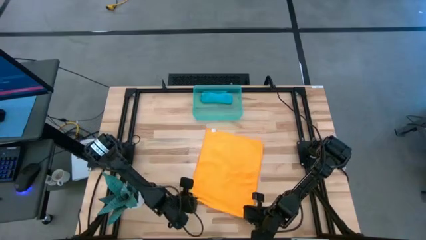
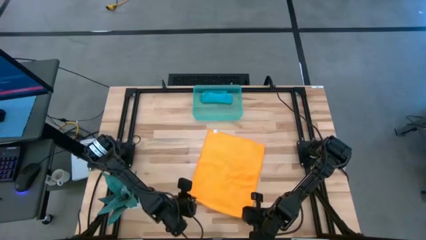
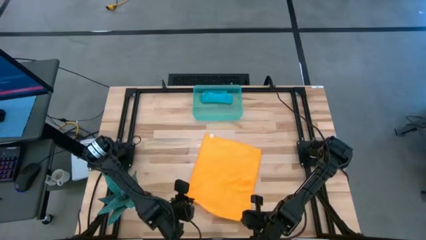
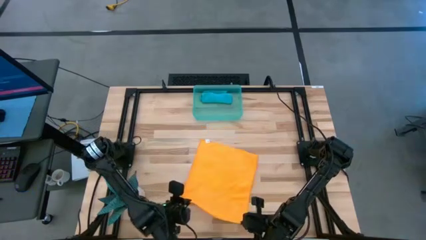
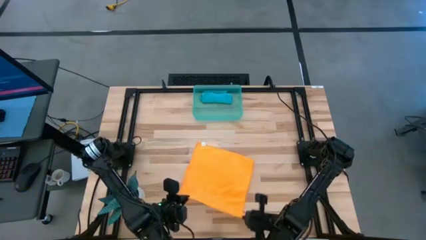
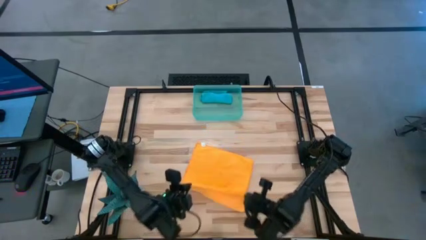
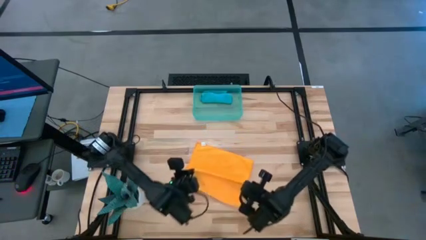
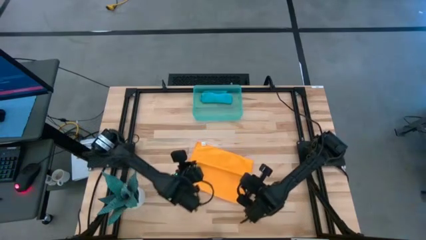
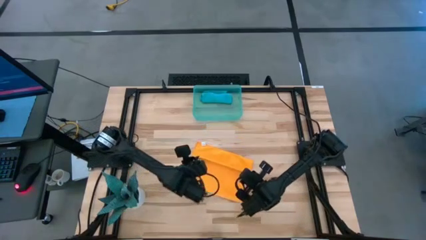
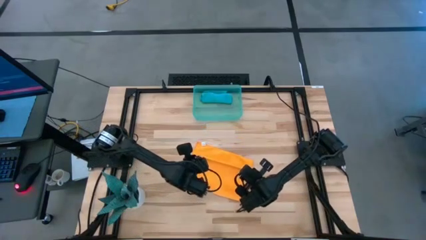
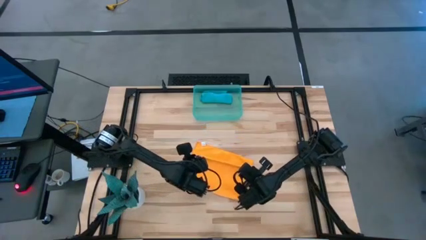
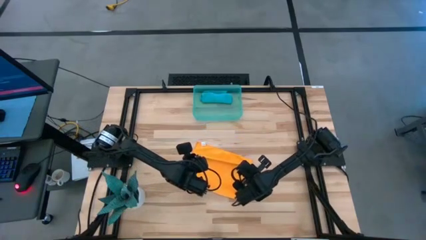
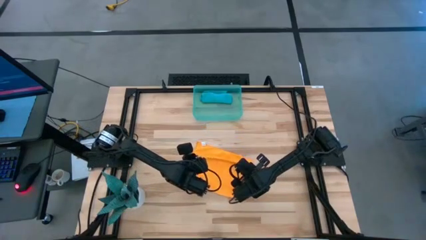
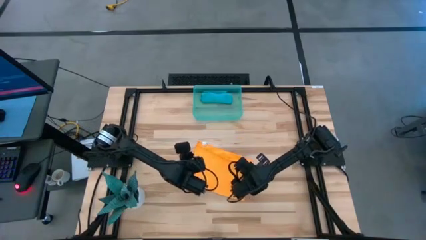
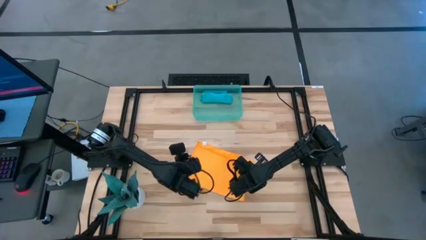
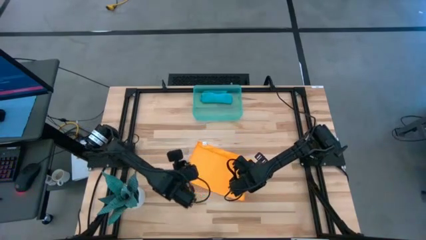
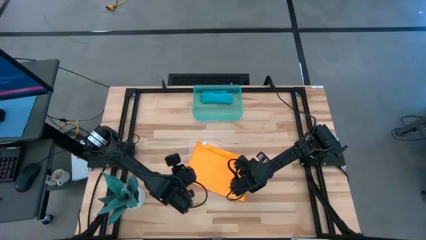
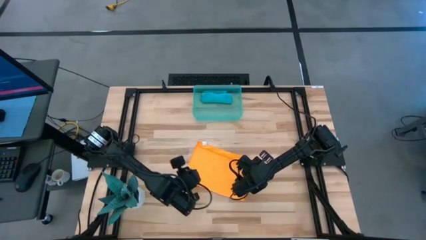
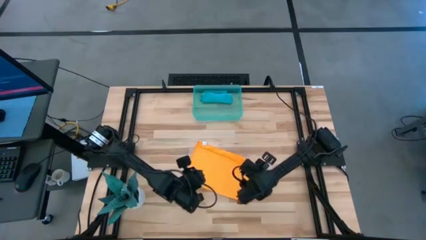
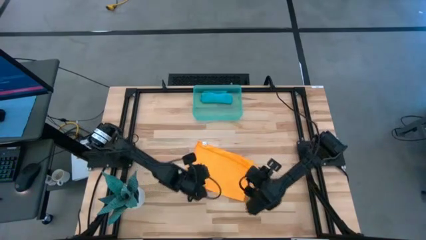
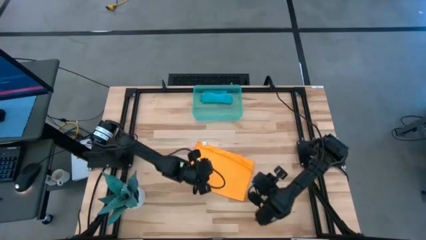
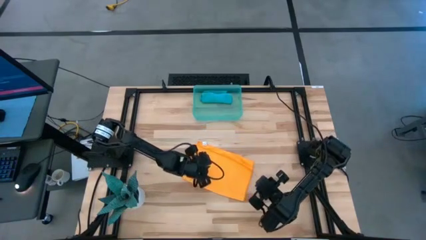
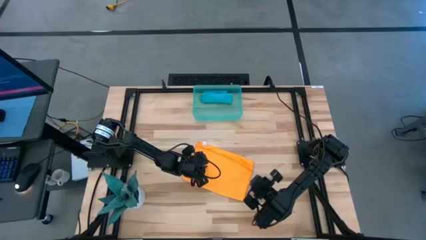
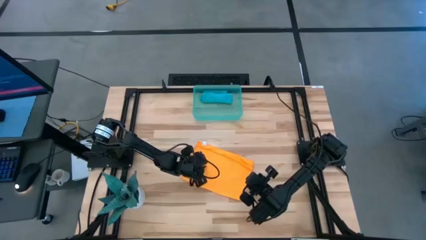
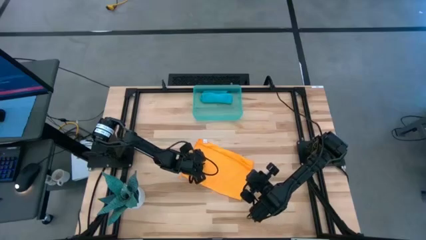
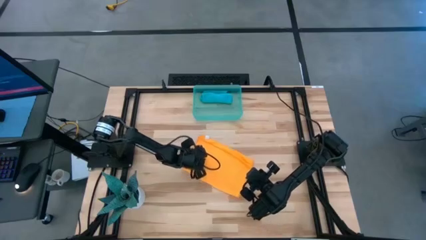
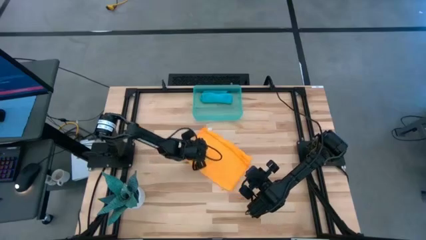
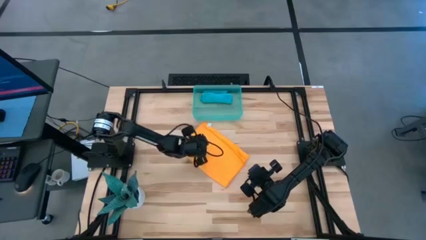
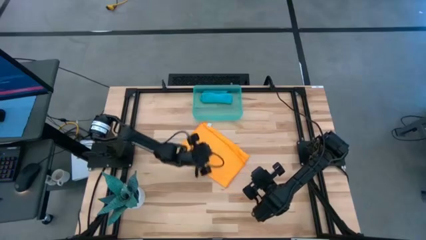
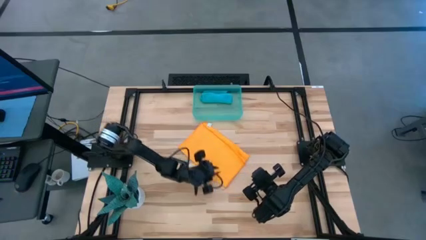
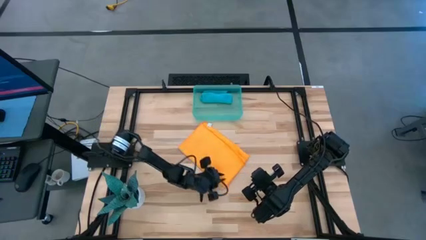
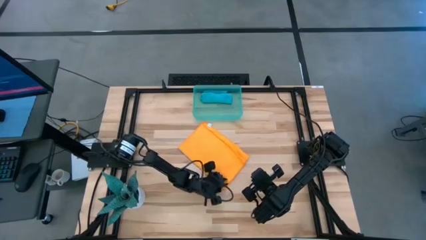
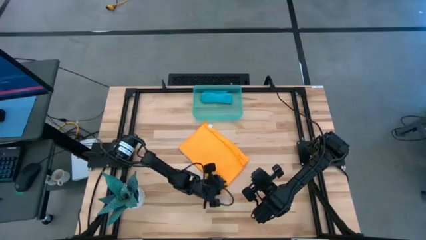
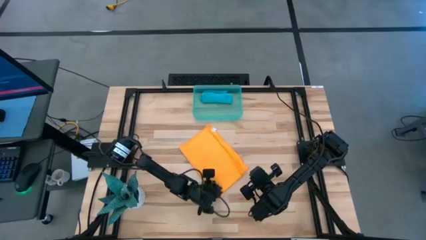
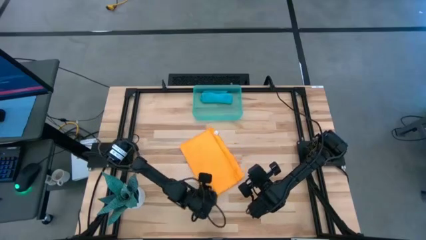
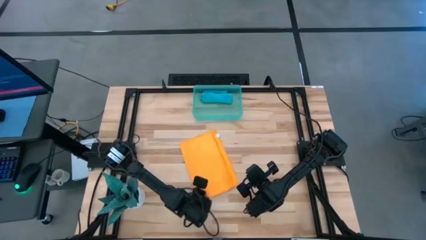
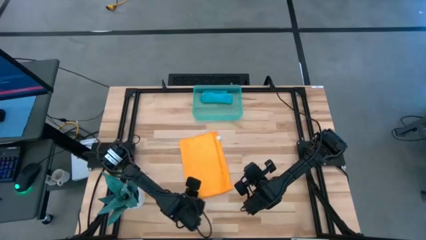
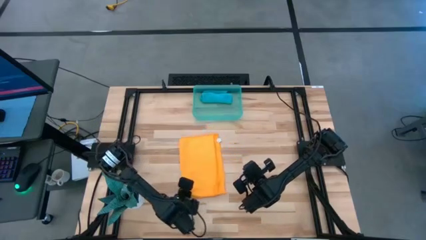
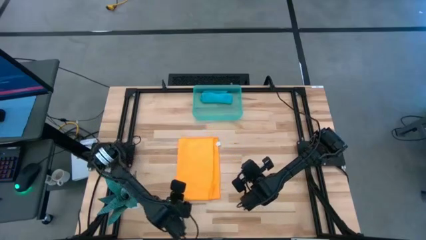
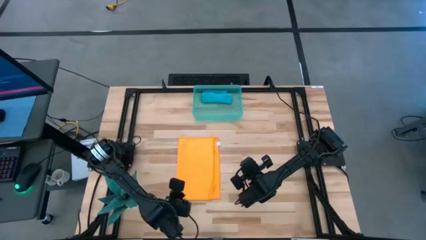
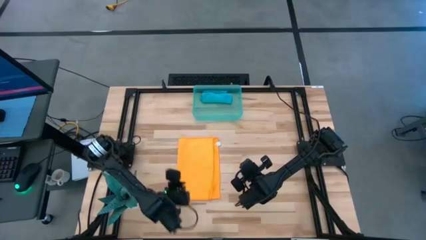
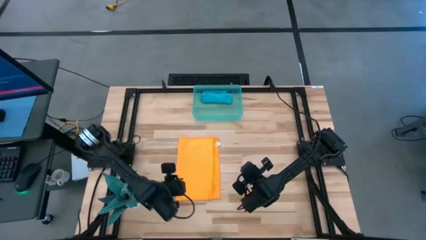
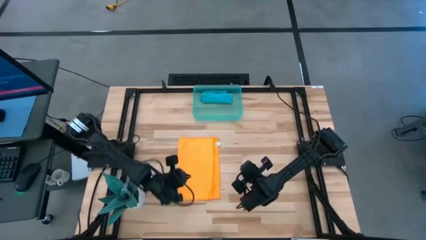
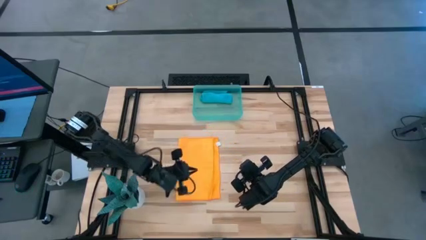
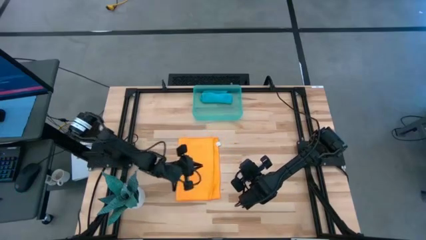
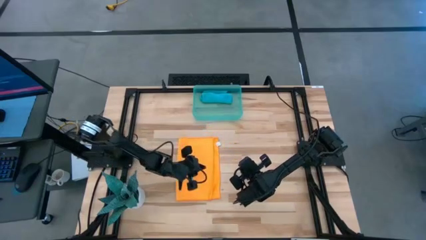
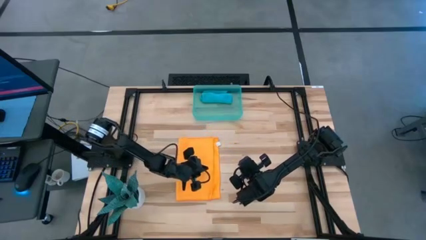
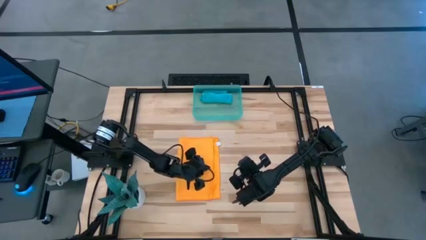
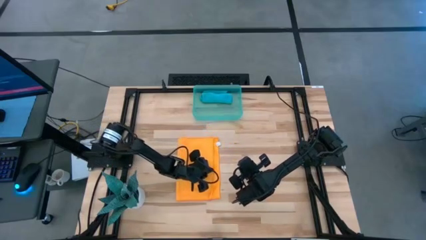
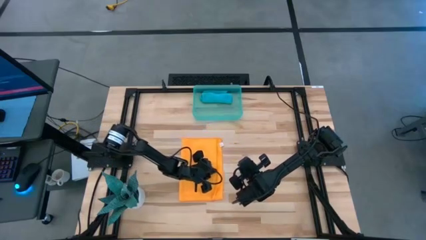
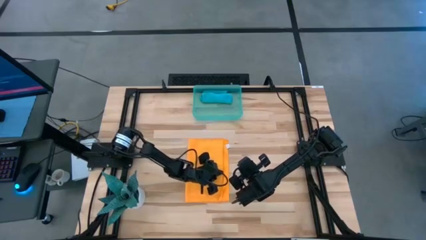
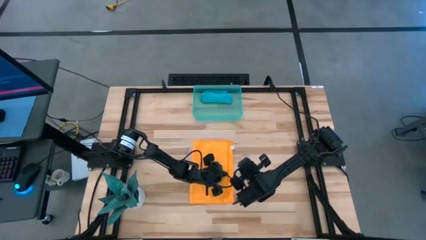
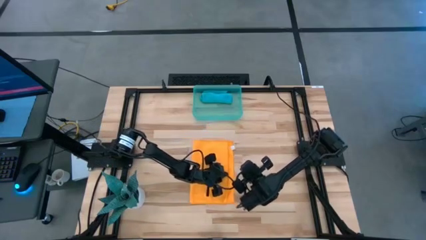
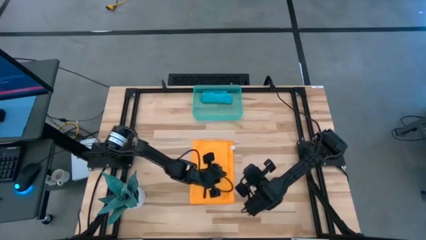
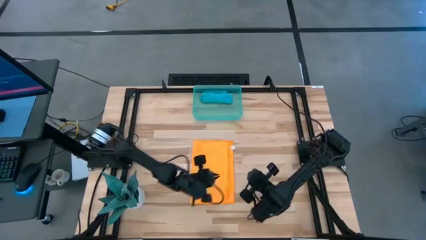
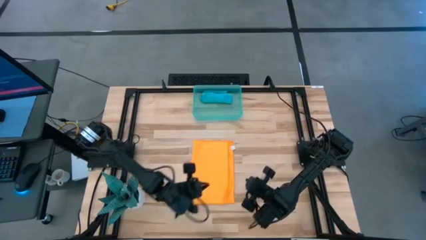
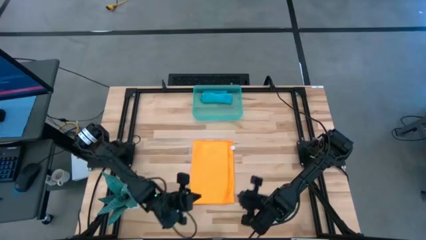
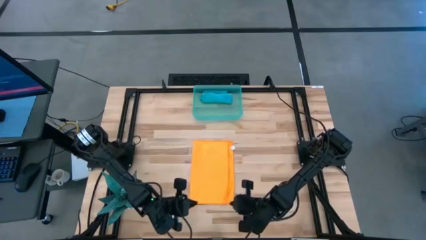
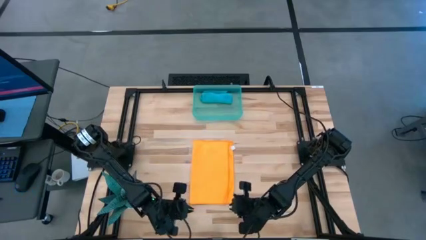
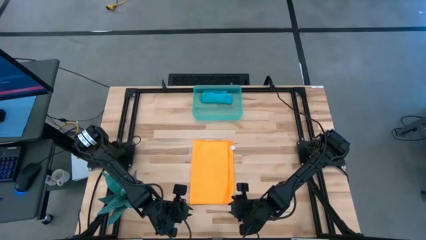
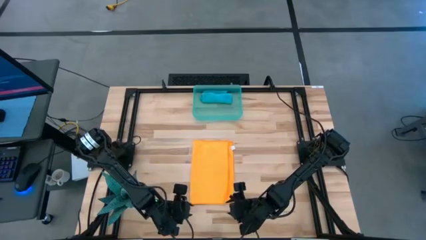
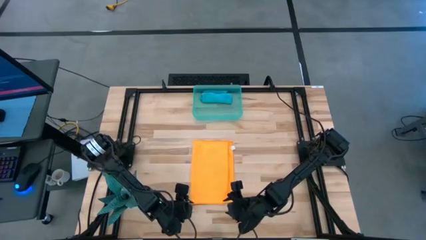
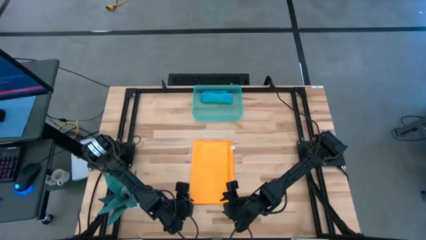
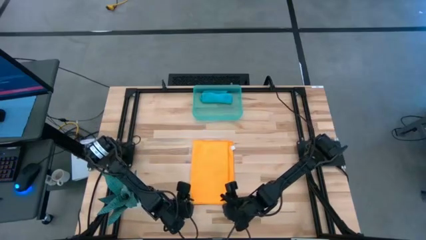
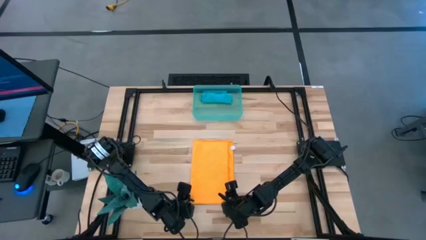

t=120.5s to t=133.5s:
Task: Roll microfiber towels into tight, uniform cylinder then place into a basket
Fold the orange microfiber cloth

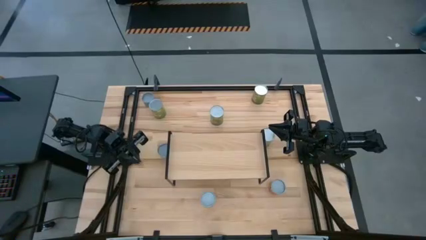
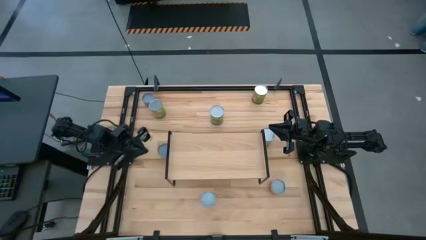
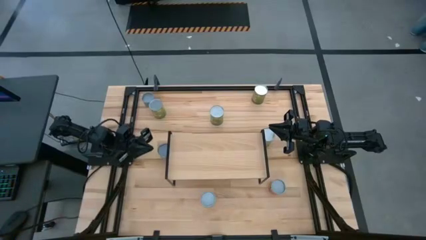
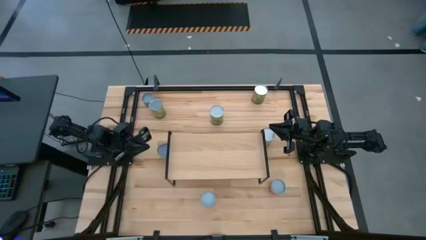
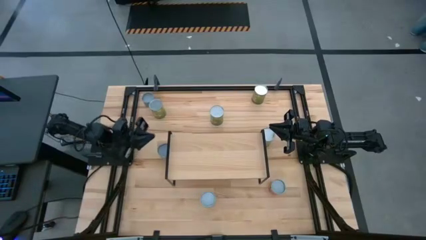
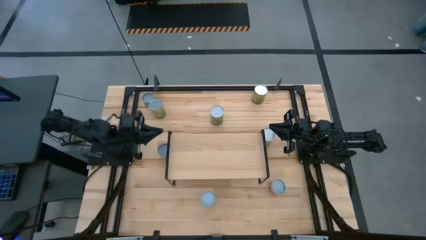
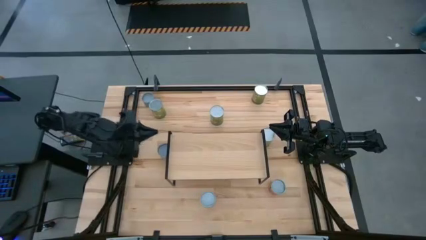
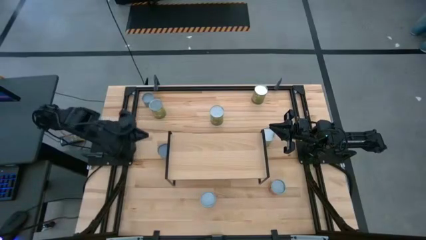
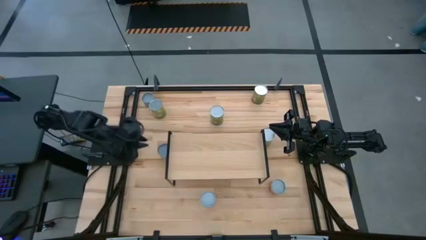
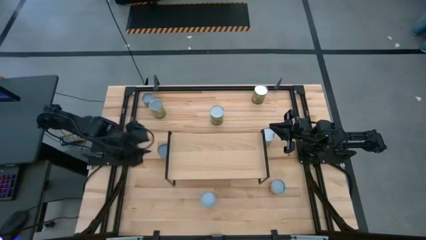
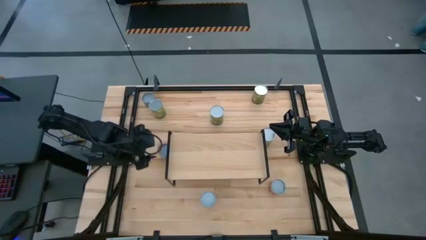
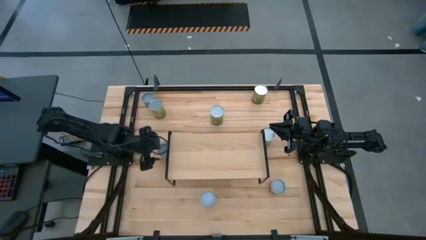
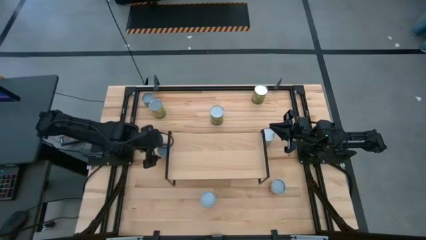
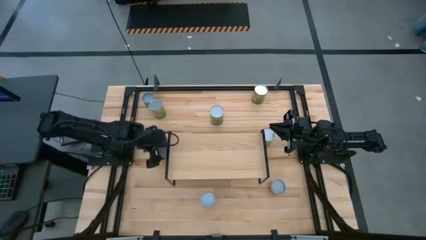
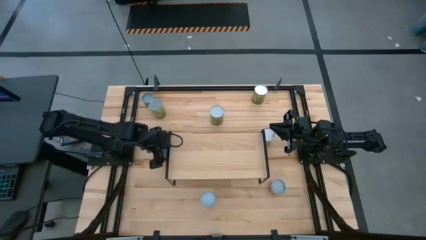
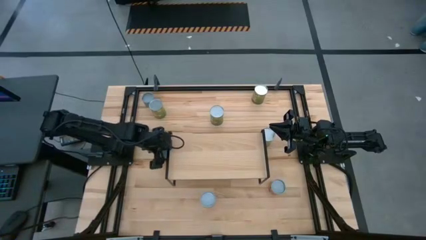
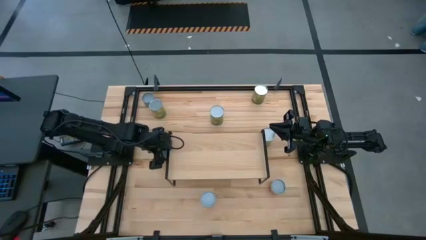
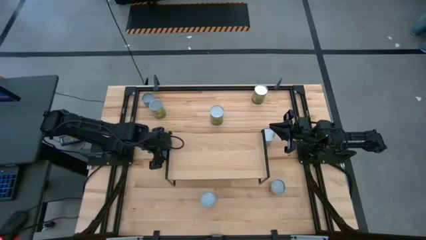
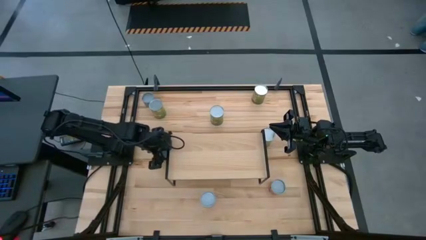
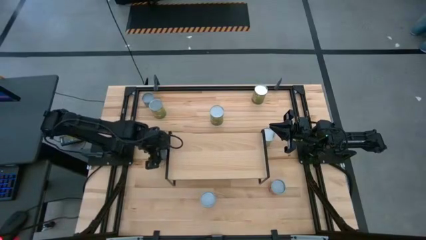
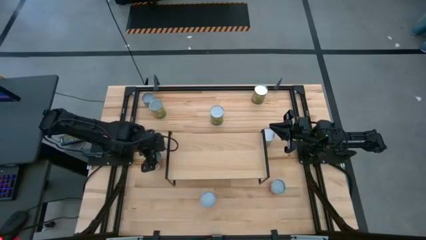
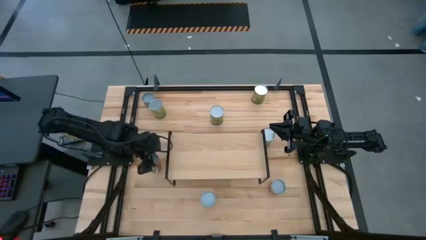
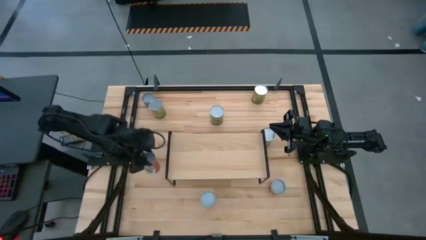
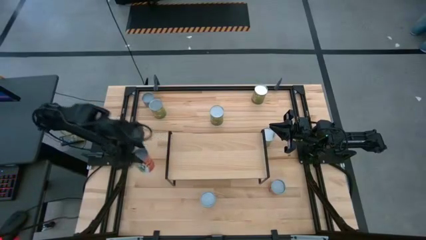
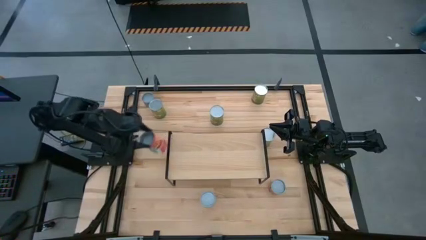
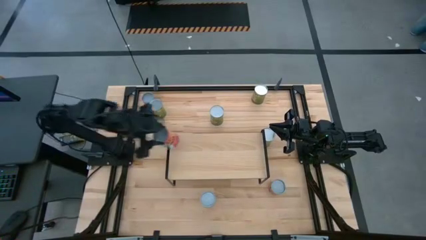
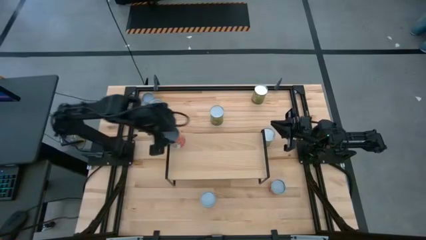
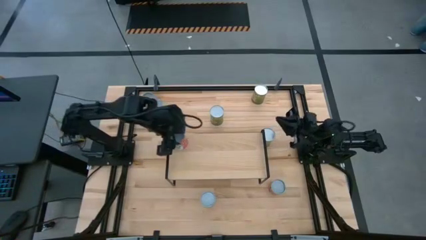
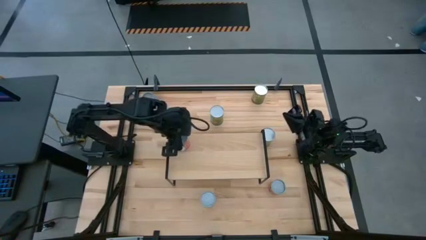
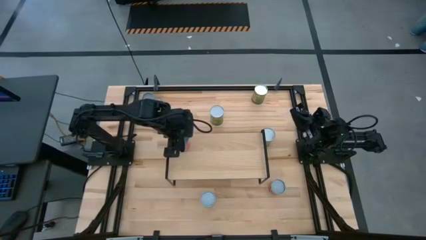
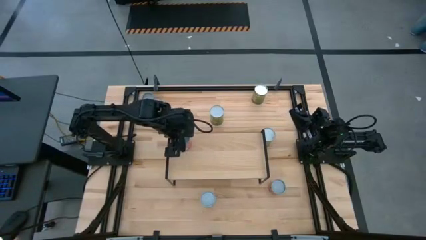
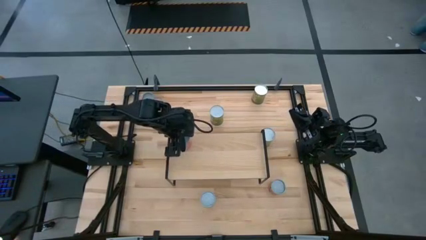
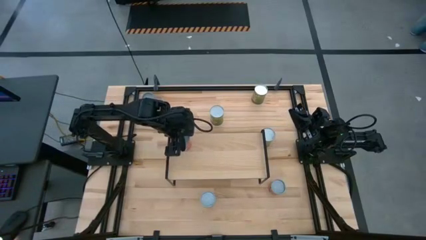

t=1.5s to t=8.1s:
Task: Pick and place cans onto a shelf
Put the canned mixed fruits on the shelf
